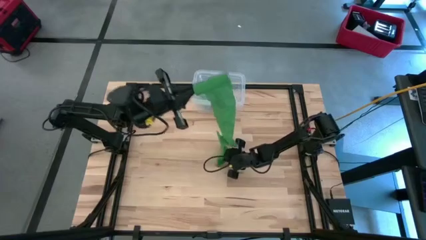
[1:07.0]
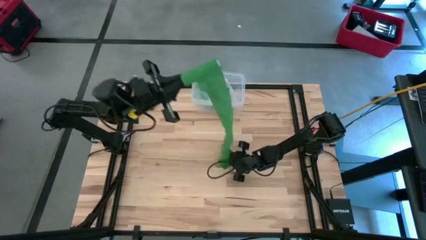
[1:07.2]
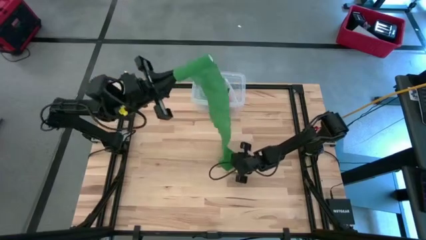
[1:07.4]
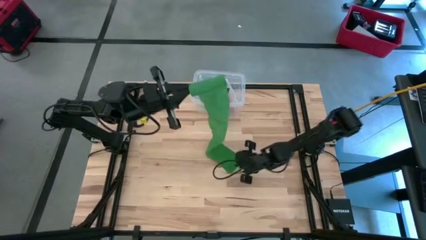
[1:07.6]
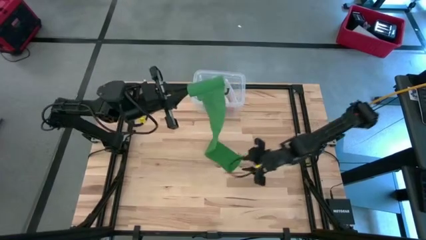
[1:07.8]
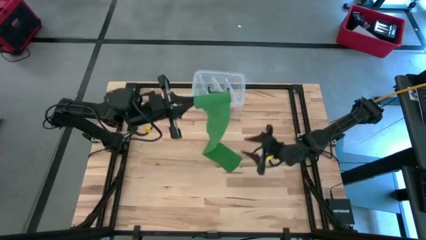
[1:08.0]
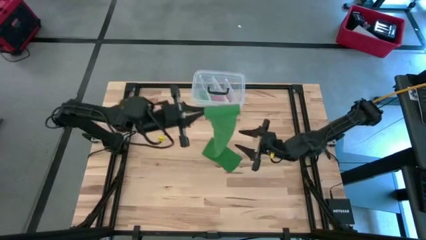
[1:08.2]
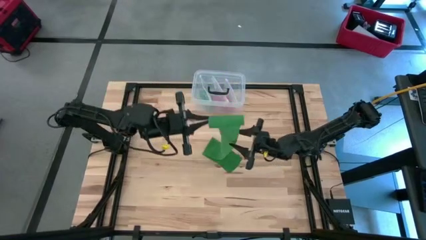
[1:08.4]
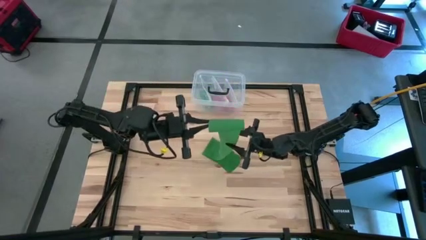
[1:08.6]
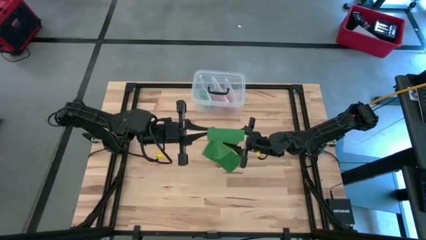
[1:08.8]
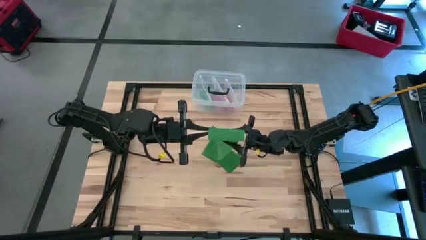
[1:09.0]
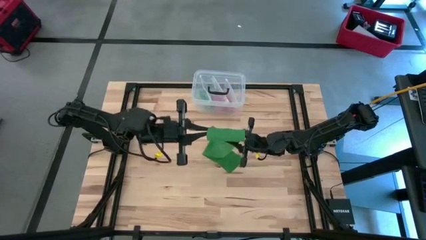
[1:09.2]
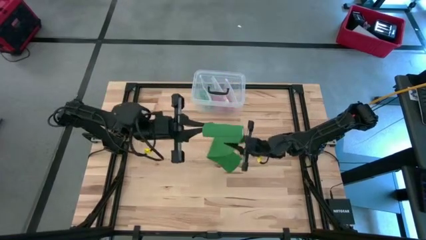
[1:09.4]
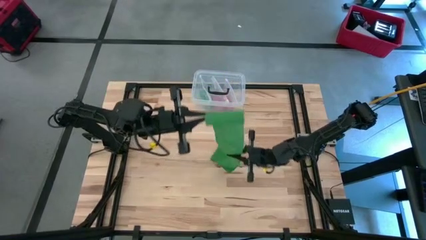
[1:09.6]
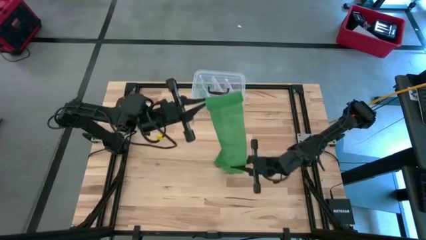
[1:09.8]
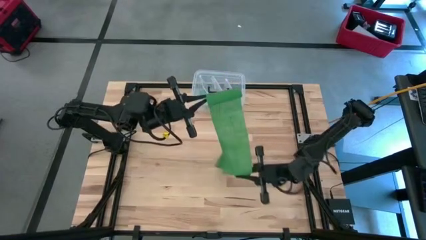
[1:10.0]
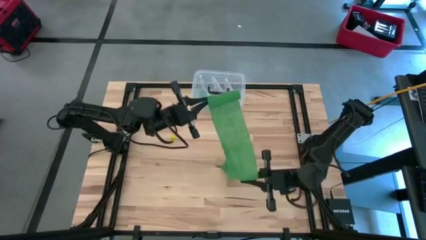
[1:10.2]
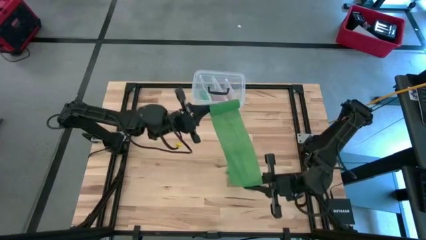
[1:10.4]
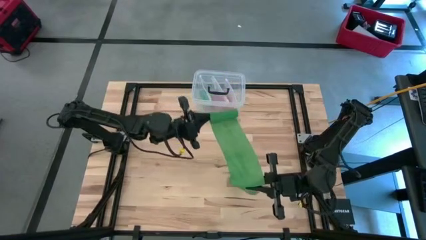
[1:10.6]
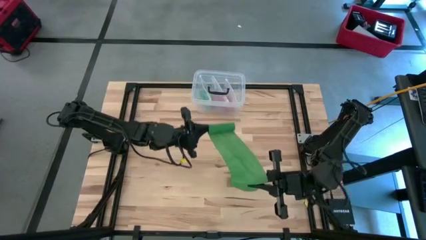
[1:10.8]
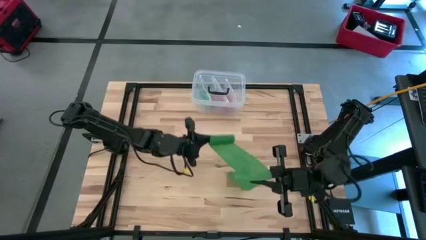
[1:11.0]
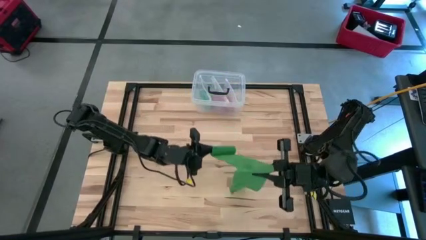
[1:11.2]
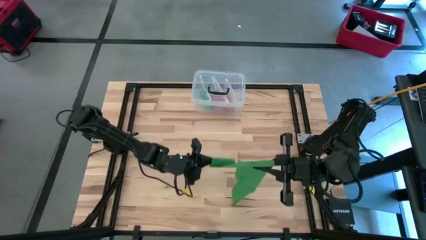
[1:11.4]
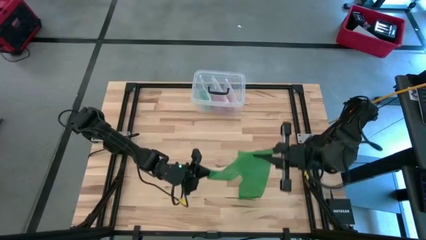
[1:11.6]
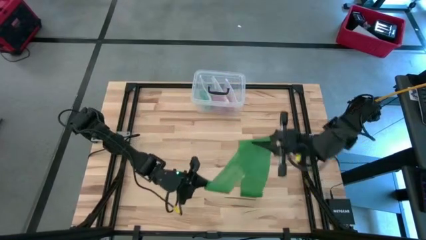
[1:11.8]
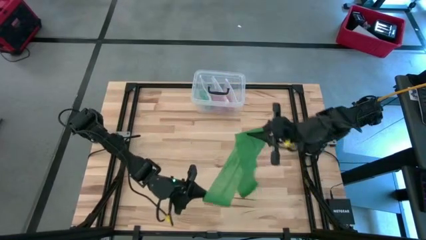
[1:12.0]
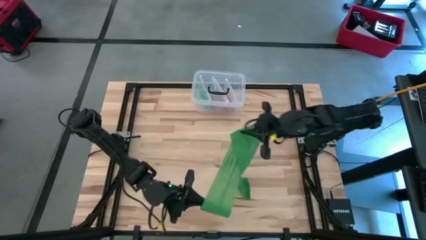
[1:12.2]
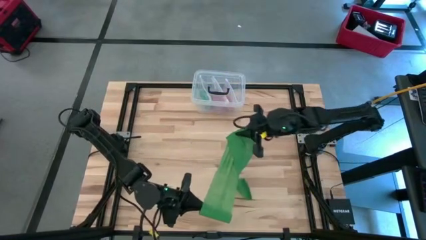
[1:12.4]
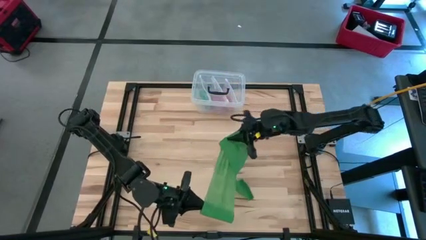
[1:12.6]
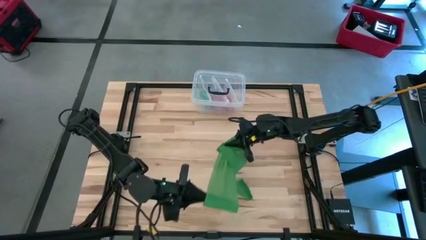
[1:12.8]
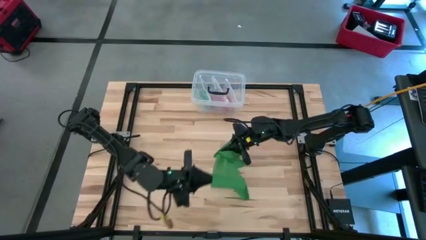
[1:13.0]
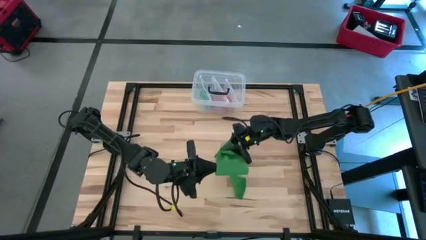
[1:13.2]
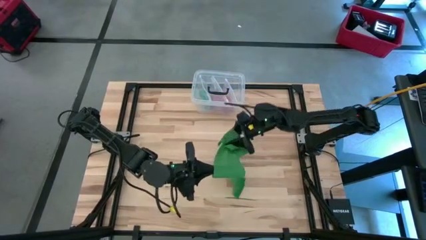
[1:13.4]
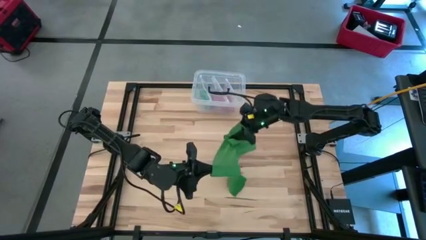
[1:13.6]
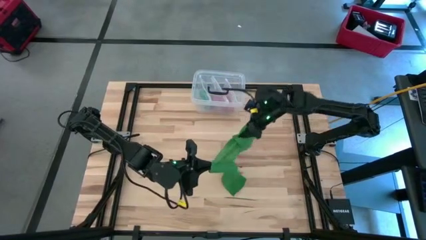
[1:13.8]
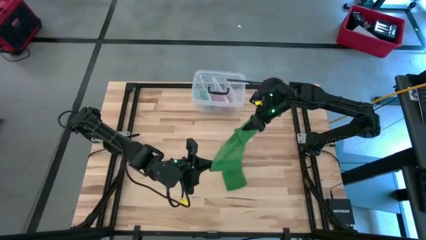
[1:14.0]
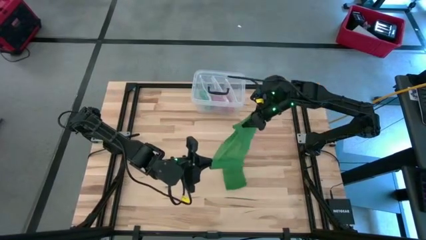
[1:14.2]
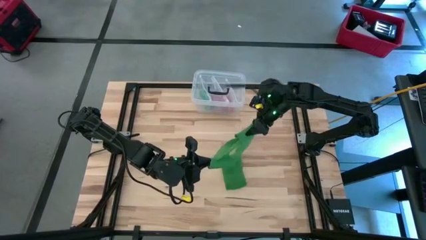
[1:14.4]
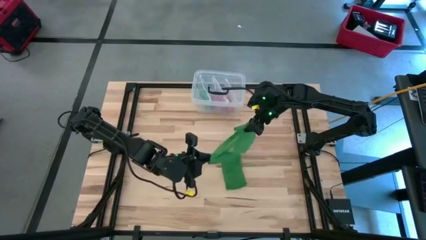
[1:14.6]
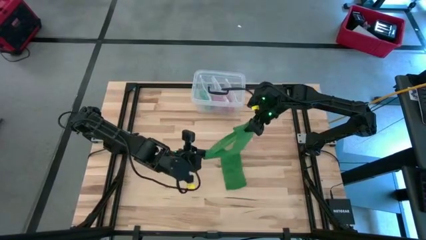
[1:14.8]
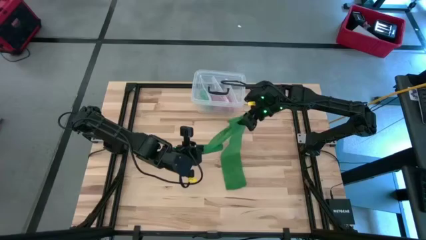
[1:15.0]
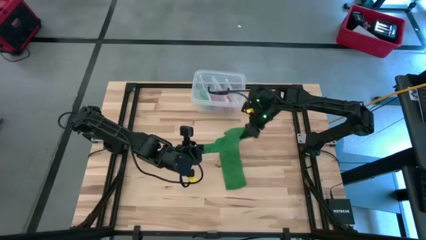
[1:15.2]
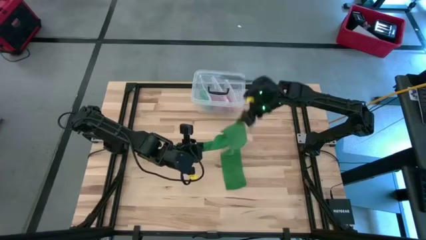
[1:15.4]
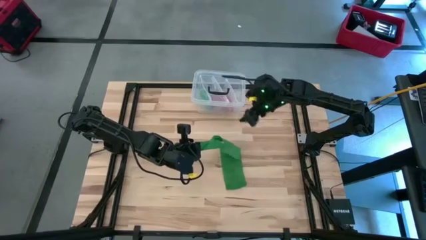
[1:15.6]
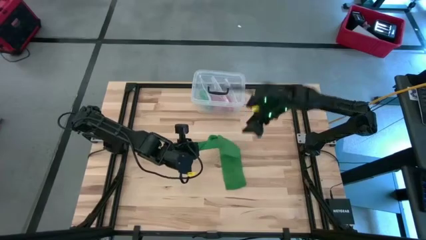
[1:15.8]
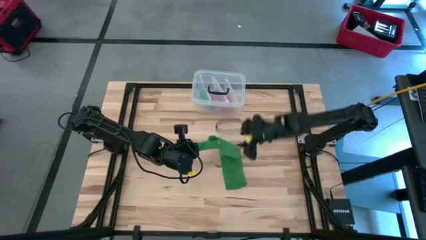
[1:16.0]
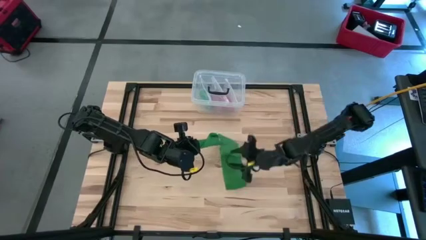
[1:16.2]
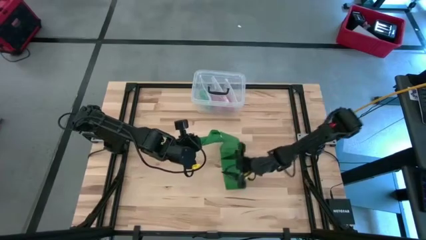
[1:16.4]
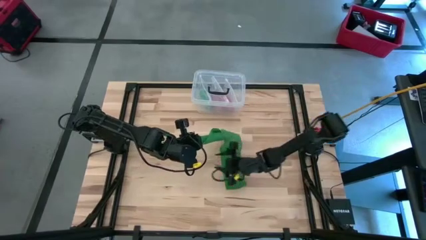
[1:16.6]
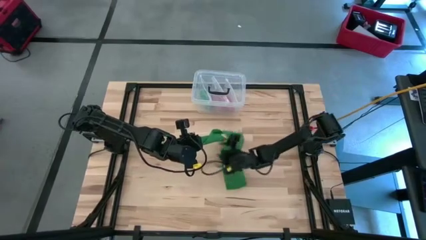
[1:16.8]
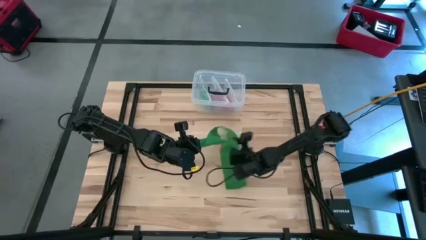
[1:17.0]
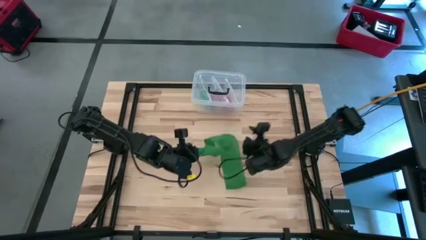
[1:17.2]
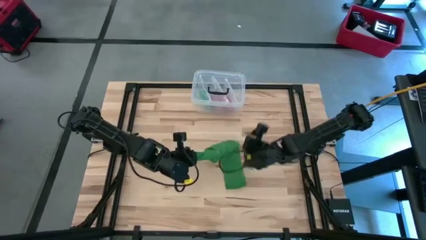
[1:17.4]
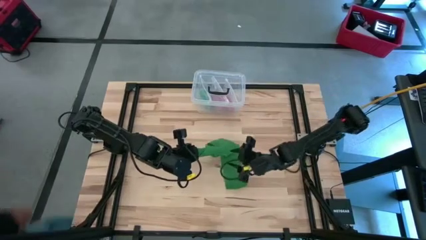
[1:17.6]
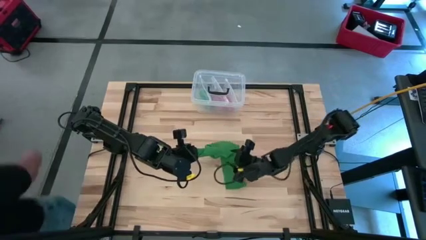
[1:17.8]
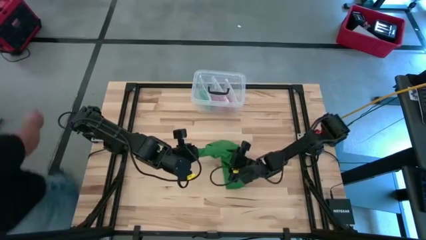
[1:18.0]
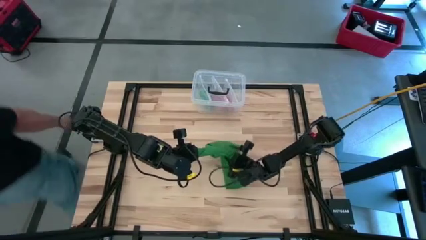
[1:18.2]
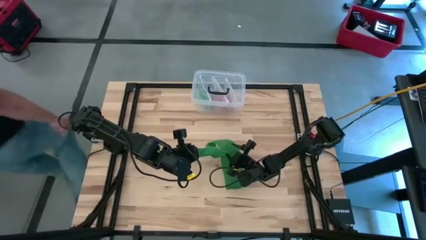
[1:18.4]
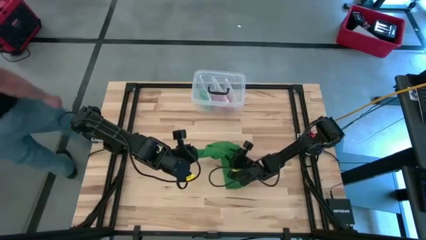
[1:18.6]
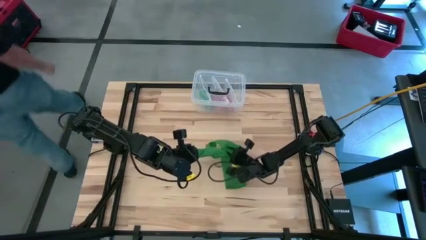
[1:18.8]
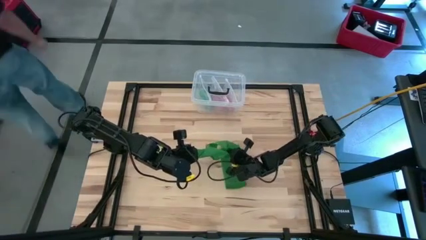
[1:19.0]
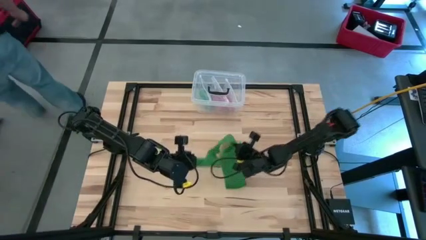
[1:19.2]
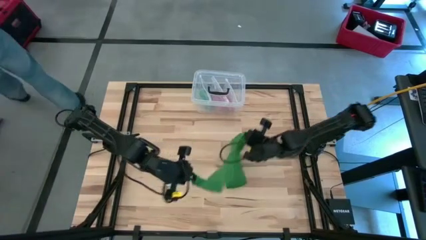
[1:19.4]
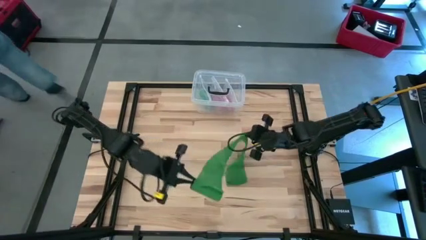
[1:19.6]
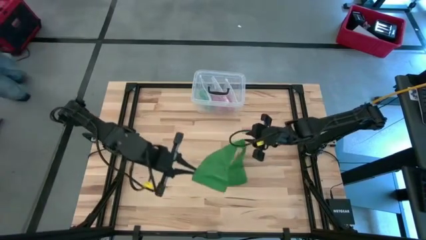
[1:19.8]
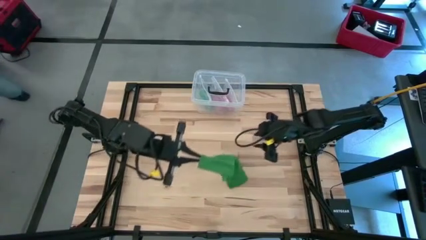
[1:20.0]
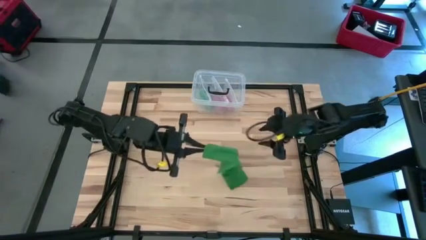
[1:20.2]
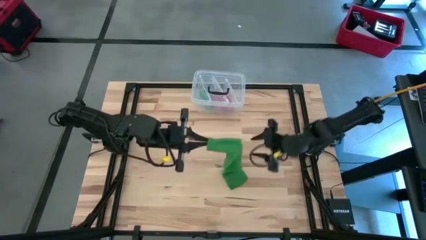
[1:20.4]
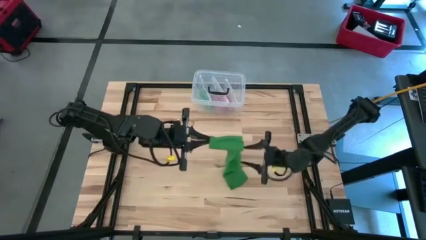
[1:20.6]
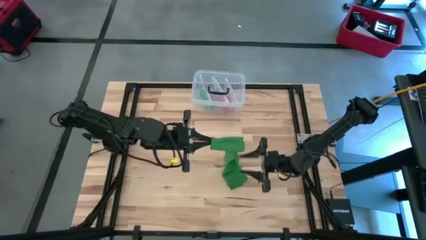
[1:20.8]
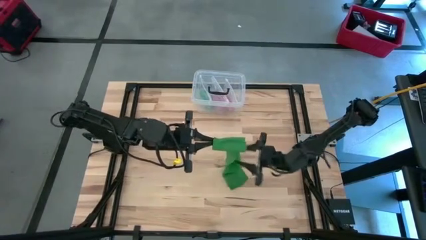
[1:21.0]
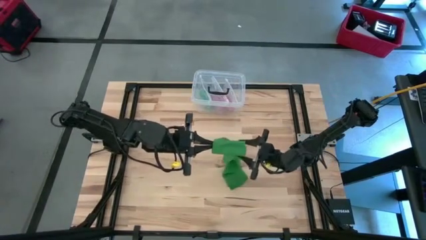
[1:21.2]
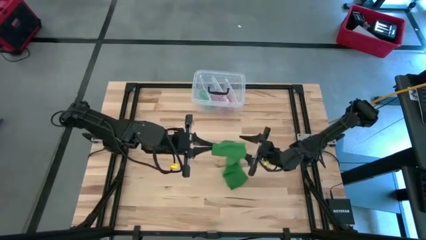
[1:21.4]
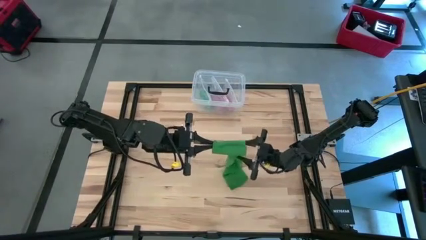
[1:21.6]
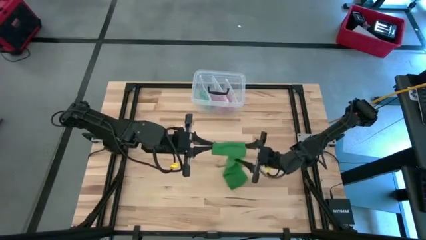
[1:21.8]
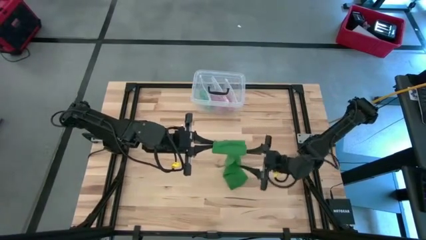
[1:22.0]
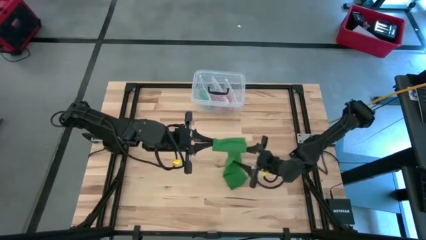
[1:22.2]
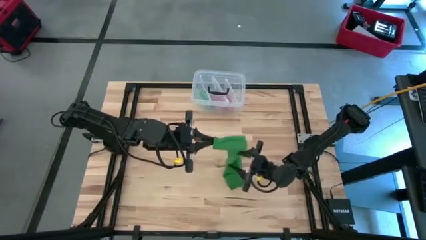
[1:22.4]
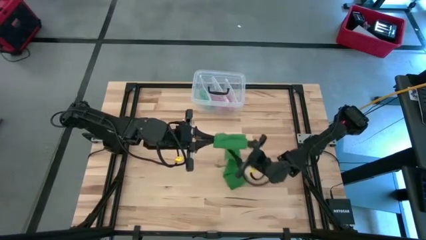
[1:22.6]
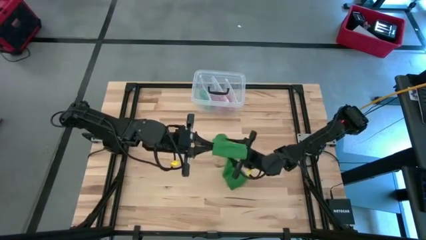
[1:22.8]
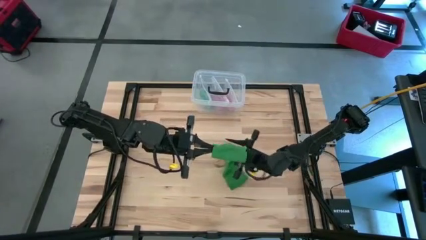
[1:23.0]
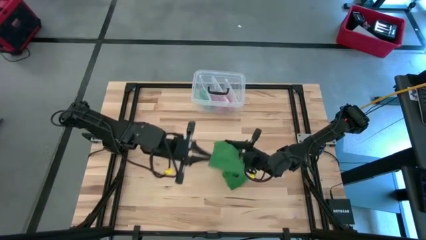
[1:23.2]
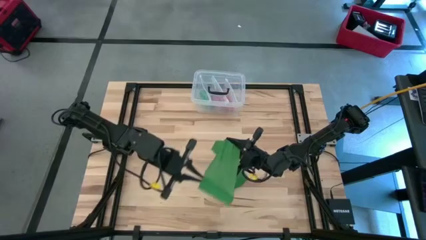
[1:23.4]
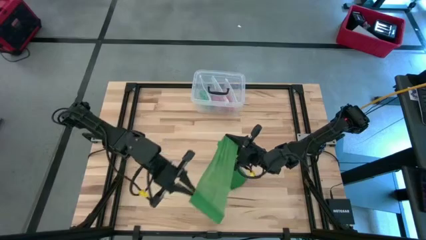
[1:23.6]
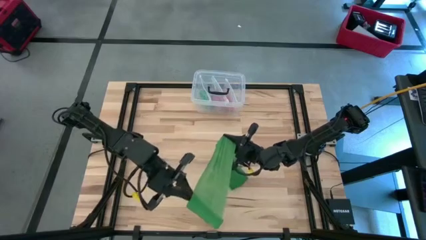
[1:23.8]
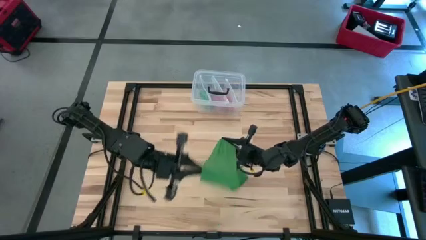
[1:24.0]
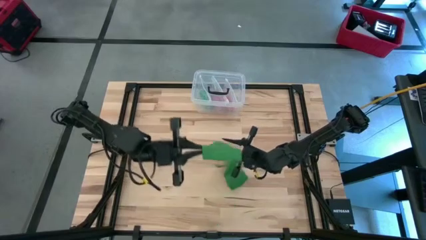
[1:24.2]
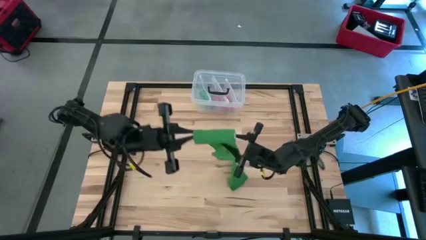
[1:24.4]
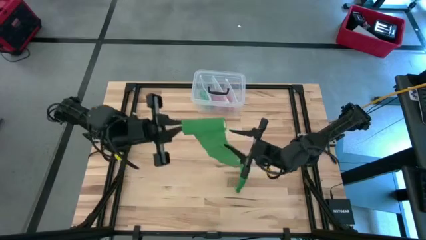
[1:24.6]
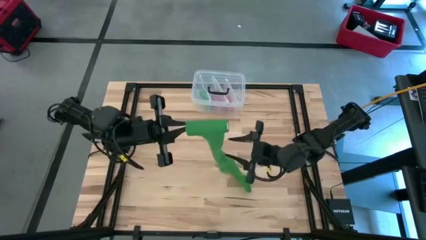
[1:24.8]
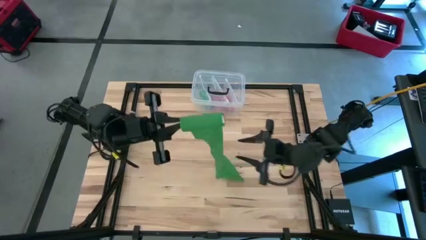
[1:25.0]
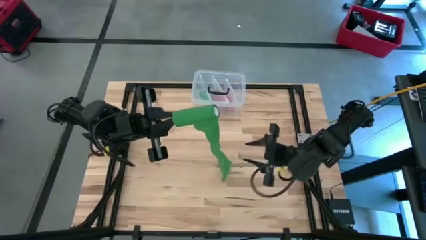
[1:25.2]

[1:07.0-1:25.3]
Task: Roll bandage
Roll the green bandage
